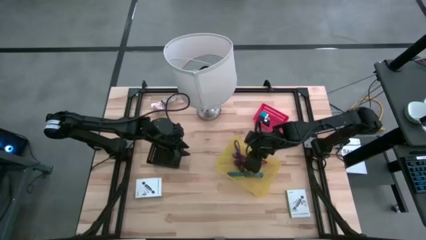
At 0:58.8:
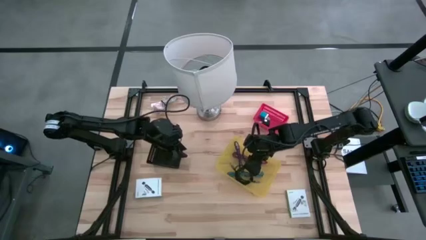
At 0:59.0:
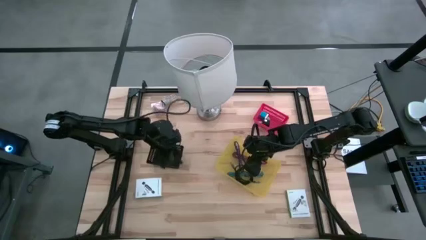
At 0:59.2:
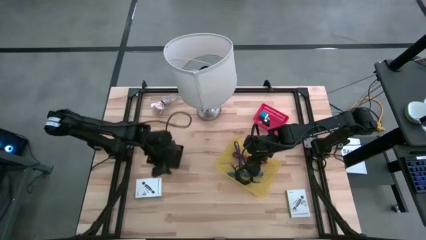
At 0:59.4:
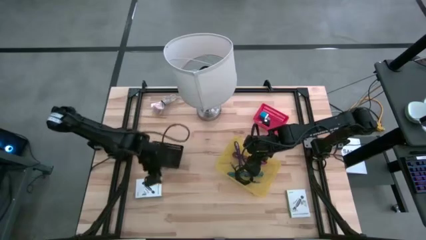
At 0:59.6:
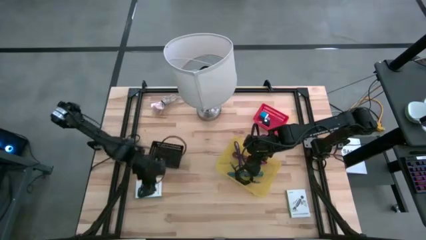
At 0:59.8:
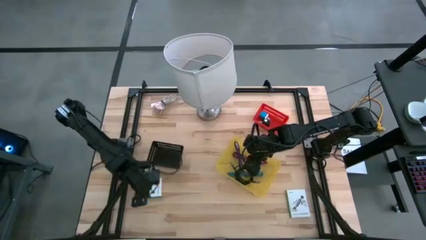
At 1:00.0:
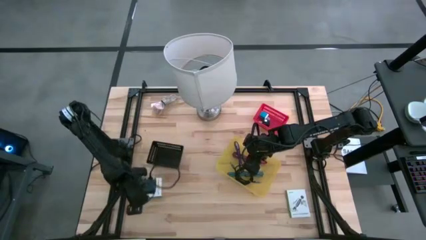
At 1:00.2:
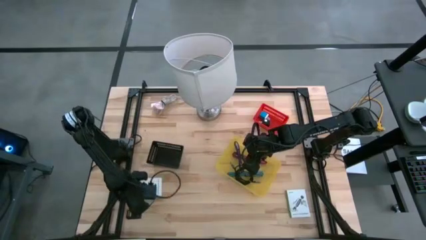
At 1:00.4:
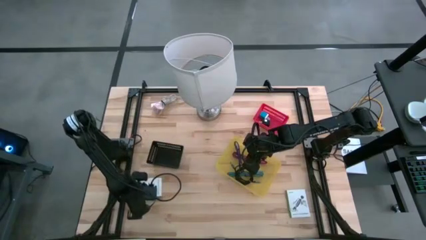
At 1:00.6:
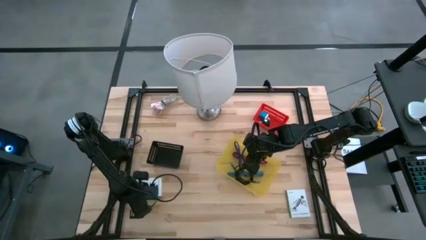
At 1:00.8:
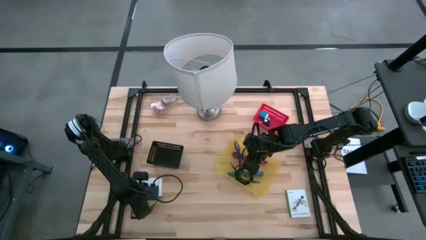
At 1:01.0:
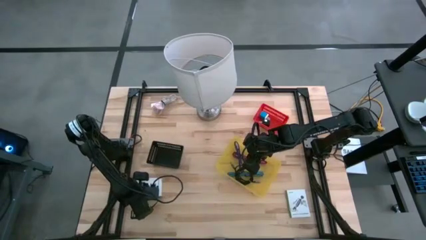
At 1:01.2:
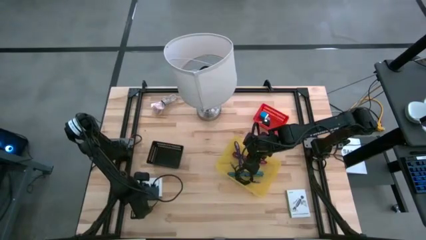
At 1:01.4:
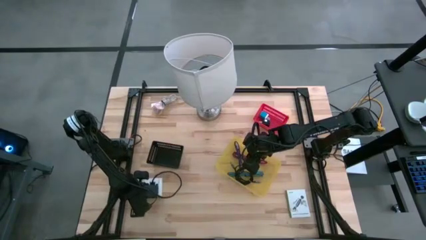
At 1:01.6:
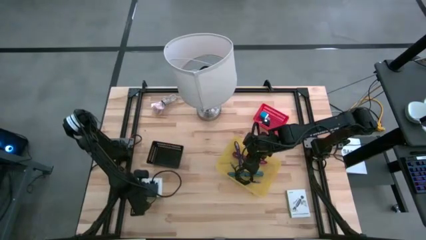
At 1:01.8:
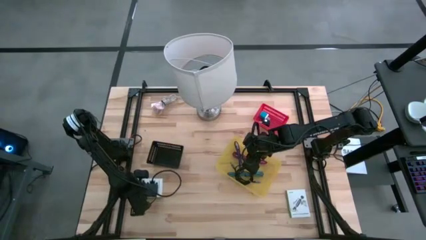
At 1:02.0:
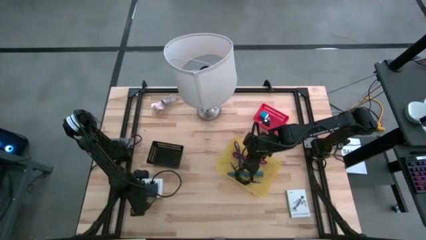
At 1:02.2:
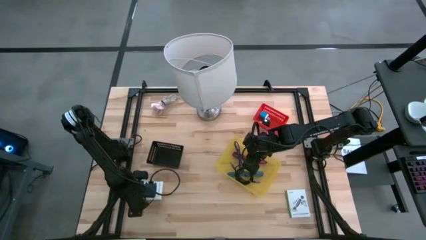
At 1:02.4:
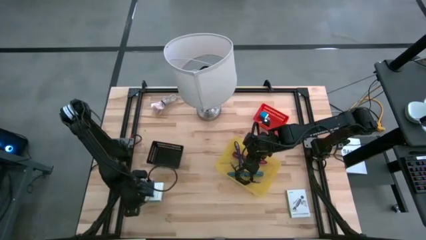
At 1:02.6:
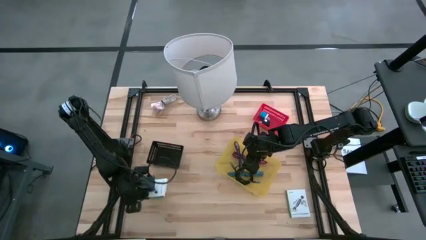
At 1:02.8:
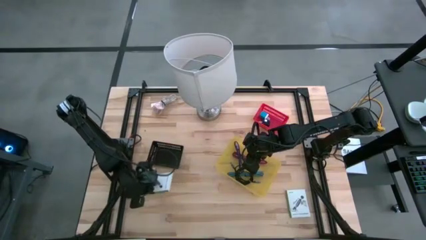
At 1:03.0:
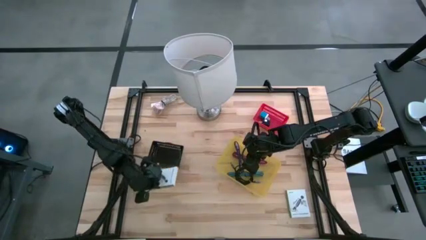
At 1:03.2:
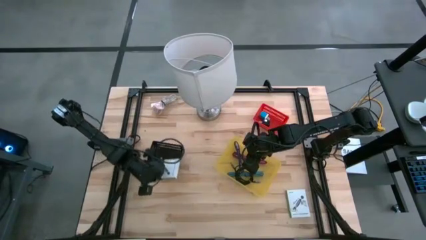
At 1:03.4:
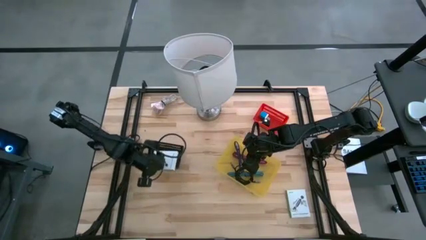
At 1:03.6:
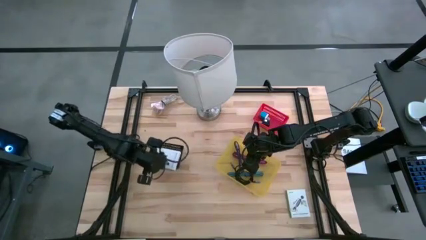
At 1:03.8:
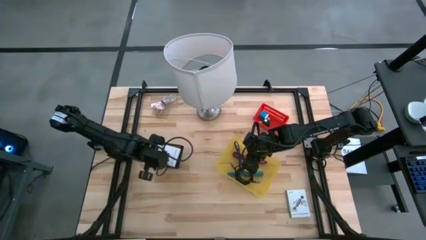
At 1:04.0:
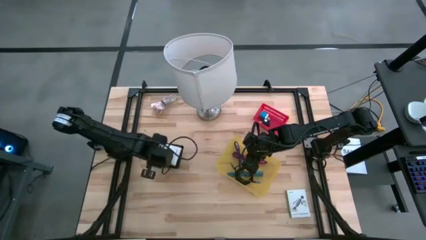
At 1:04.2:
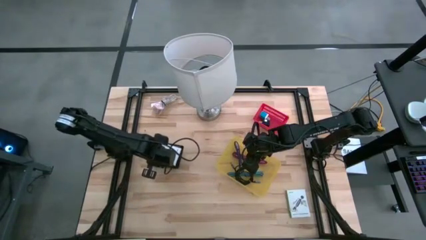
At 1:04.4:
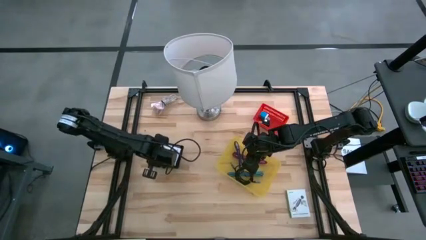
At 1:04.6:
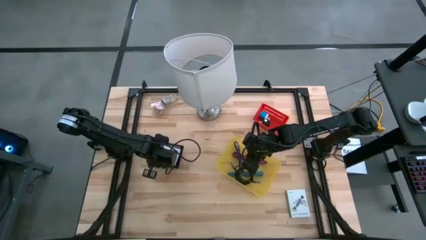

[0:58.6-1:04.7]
Task: Pick and place items into bin
Put the left white card reader box into the black bin

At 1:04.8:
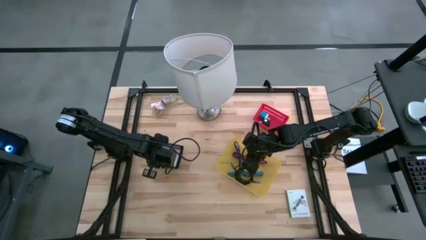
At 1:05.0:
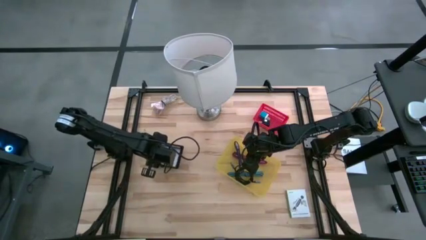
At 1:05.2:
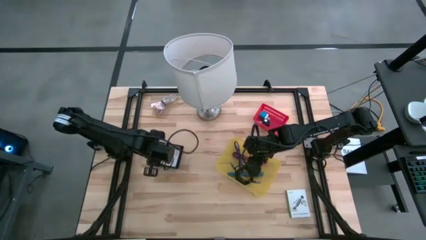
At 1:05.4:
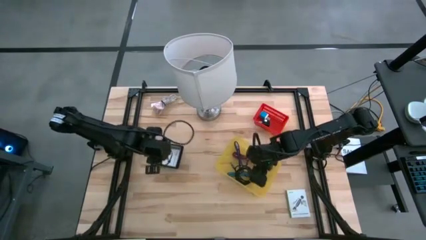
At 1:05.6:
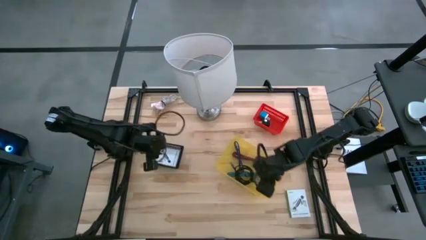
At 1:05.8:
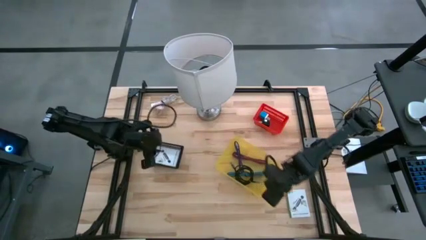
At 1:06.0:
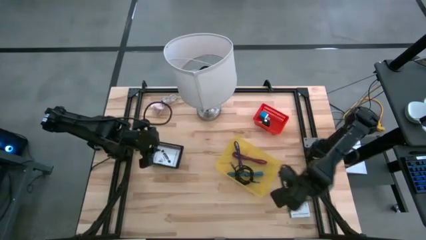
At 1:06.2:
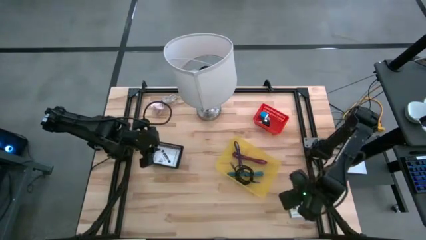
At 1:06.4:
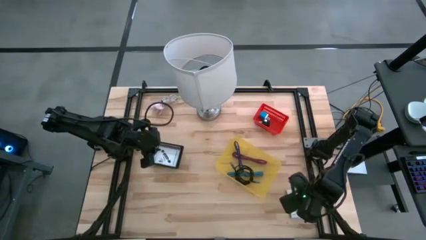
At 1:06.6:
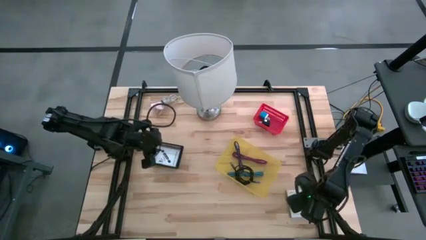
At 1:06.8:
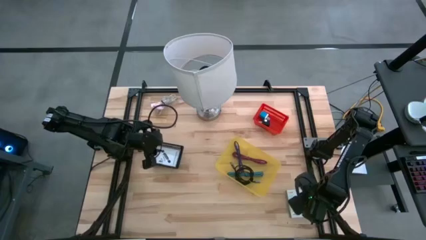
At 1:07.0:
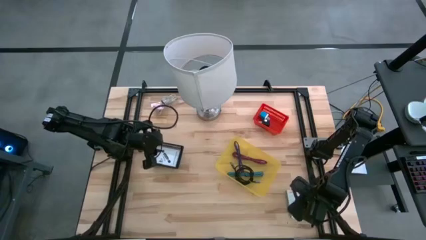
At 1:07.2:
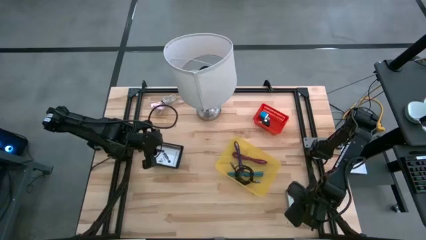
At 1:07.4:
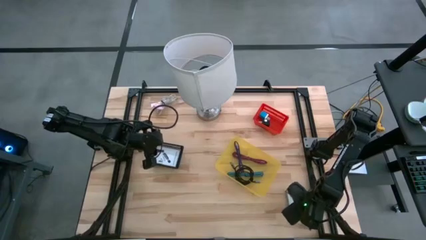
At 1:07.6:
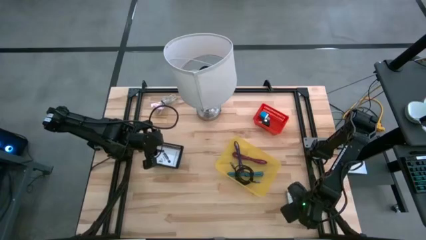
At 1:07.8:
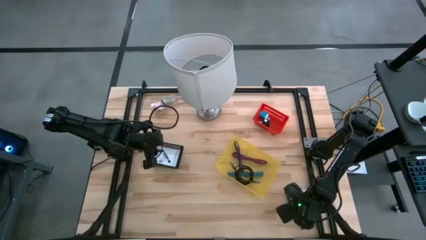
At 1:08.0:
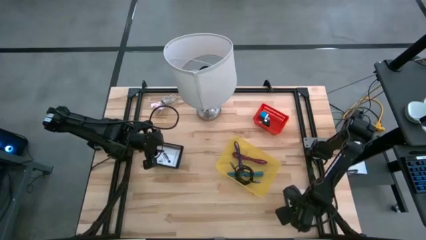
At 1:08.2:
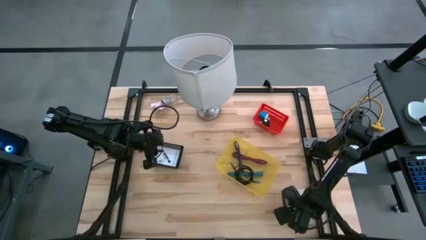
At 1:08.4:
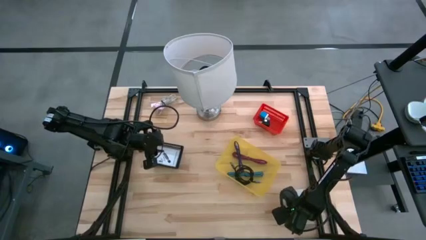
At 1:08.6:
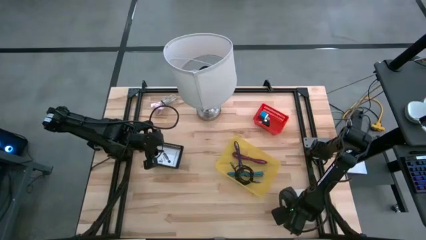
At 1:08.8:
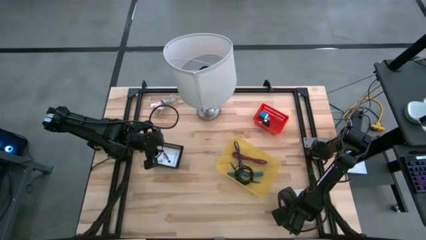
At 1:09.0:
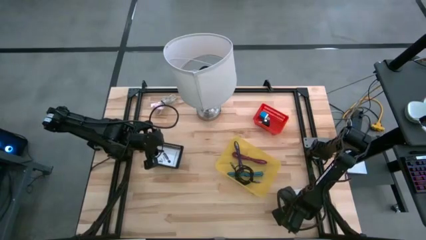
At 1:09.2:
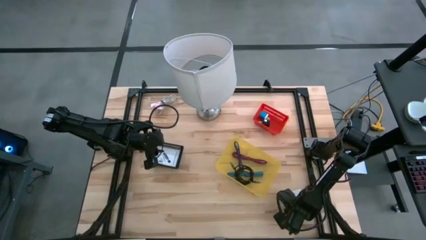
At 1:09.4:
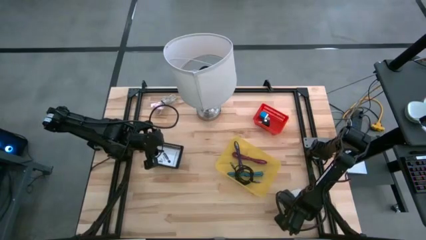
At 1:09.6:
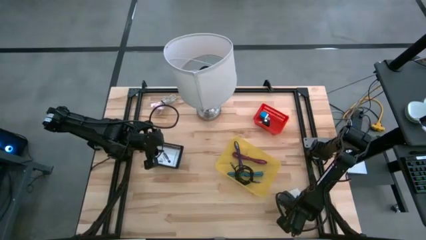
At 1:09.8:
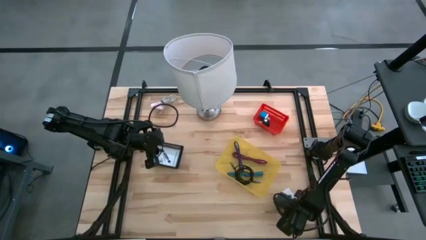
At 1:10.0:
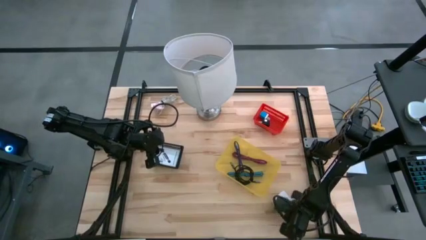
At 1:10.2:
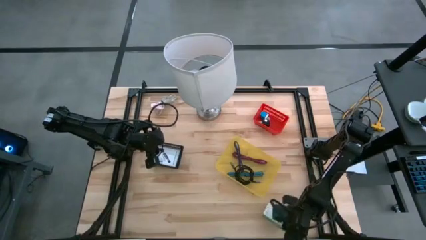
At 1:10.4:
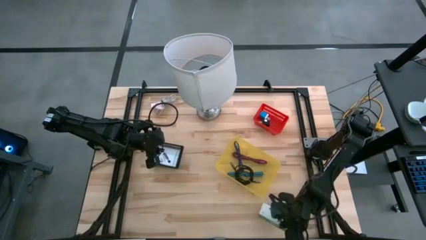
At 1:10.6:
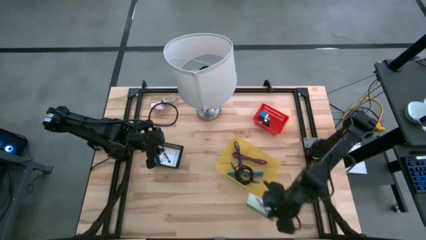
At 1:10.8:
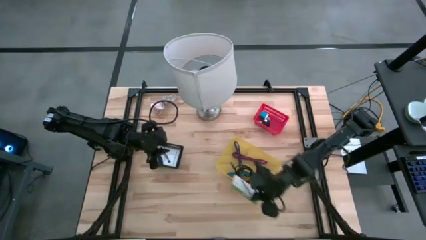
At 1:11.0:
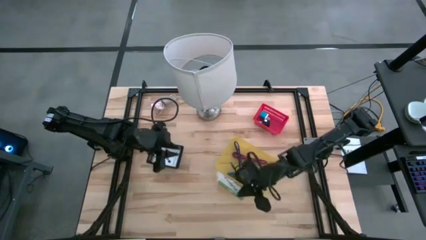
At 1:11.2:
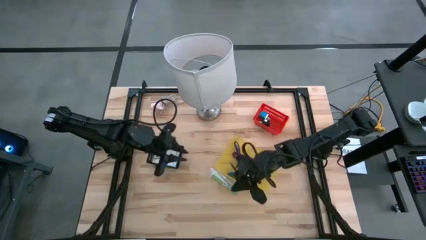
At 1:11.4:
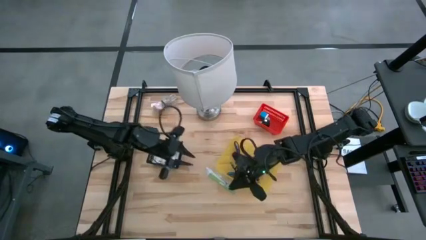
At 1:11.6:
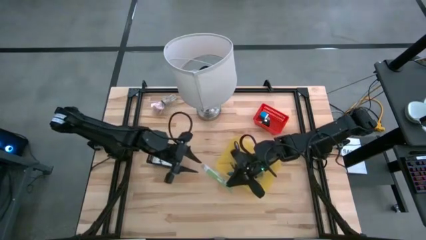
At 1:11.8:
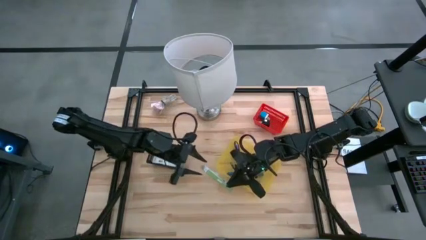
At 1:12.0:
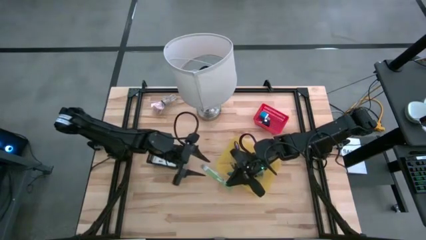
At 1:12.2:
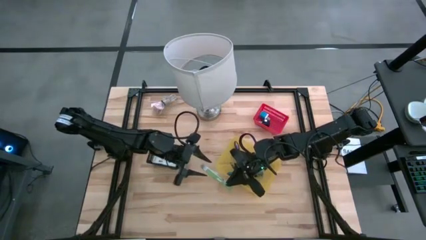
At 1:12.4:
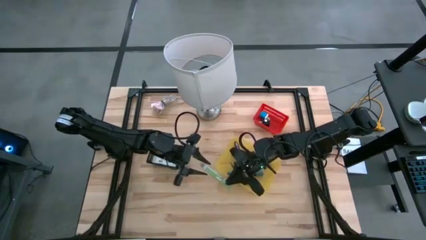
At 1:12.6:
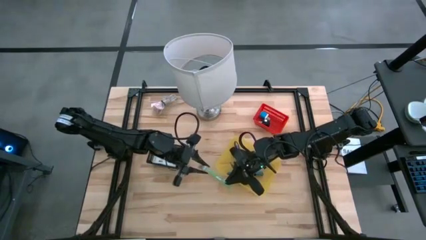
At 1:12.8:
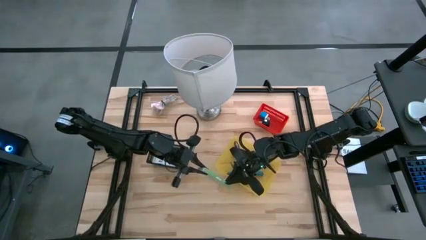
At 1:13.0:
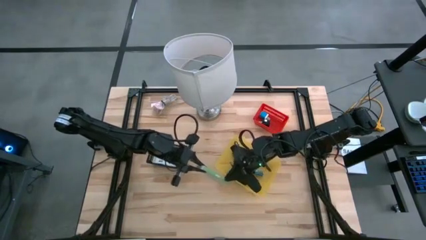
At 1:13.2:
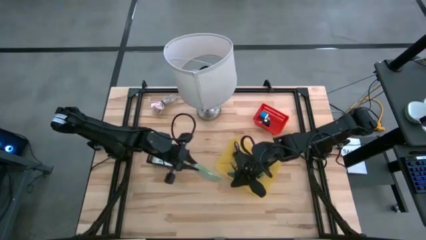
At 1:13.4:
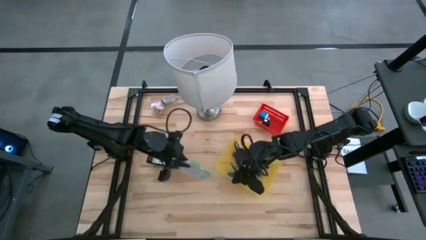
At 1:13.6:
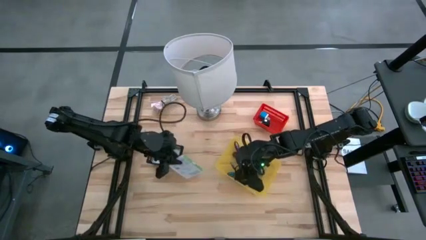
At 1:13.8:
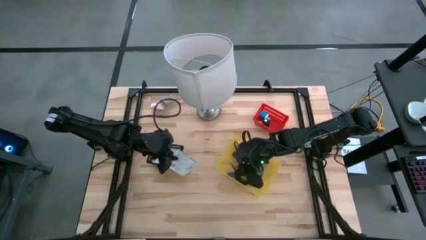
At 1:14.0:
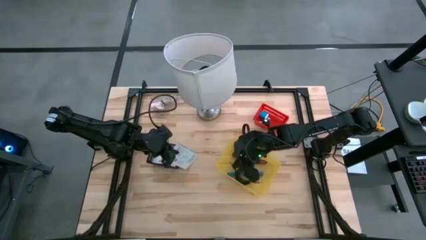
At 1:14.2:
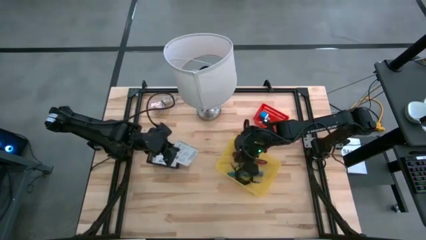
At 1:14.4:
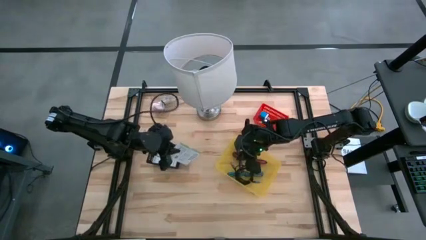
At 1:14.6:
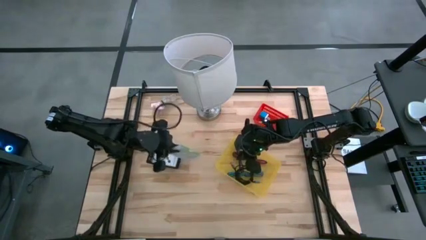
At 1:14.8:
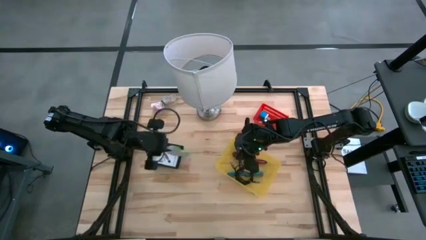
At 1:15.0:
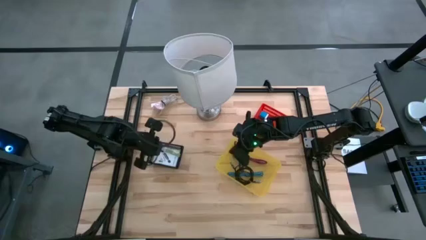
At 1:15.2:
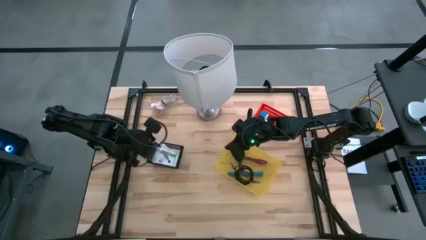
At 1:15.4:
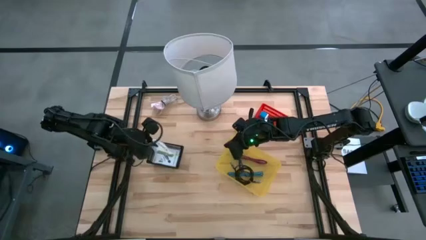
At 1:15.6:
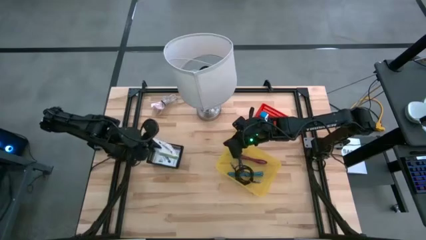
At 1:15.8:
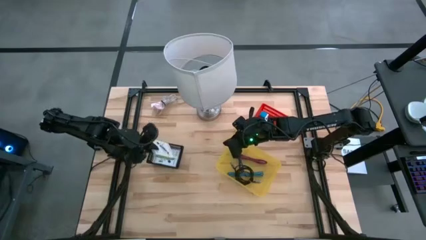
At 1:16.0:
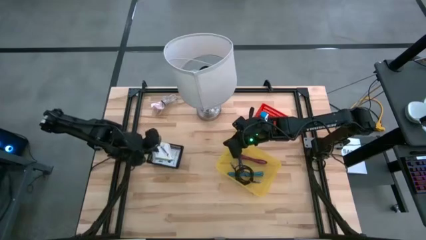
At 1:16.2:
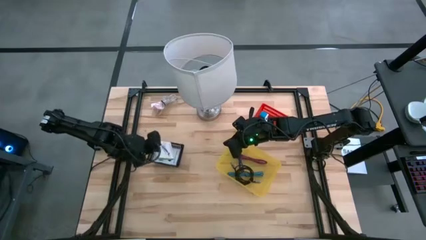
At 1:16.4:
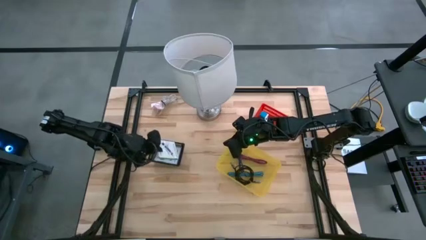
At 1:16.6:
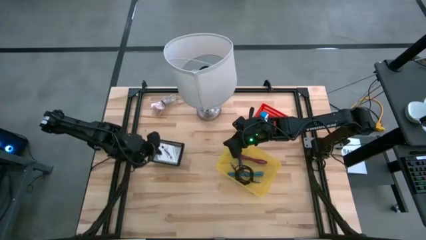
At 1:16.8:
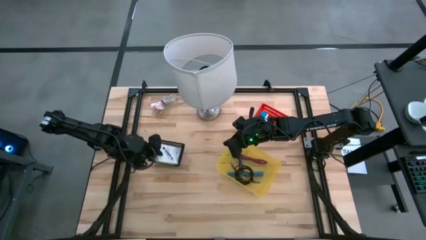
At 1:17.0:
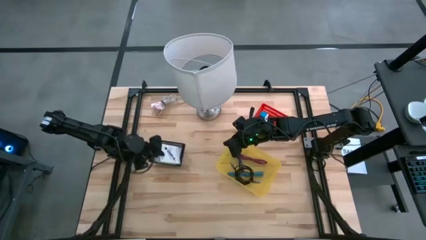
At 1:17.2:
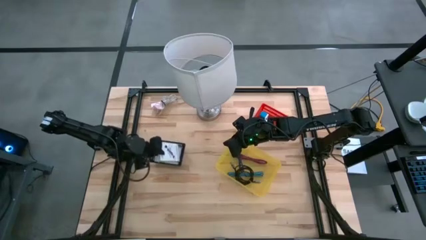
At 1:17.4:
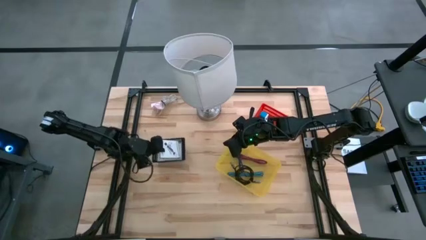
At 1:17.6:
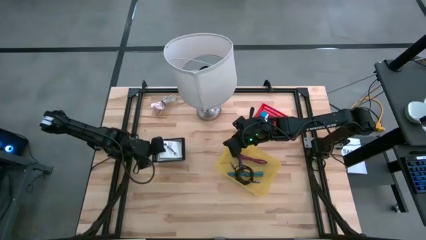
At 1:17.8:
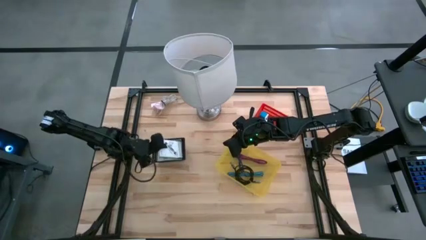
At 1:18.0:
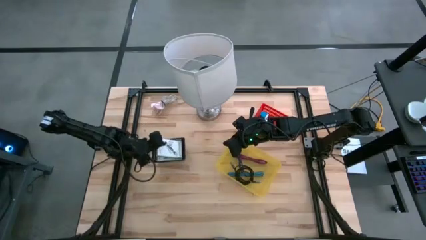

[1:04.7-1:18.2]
Put the white card reader box into the black bin
